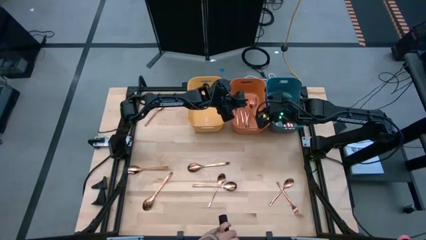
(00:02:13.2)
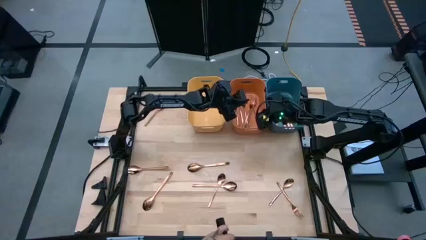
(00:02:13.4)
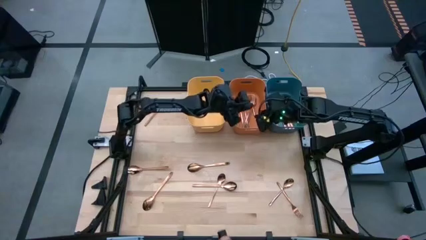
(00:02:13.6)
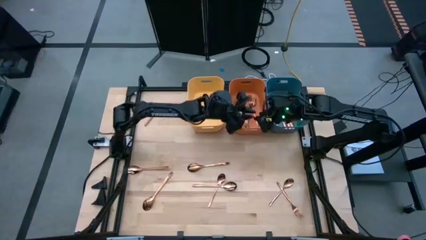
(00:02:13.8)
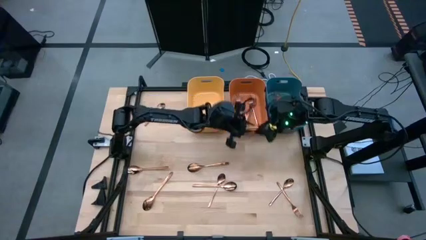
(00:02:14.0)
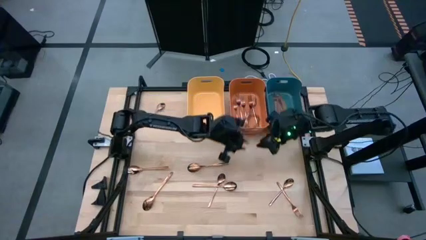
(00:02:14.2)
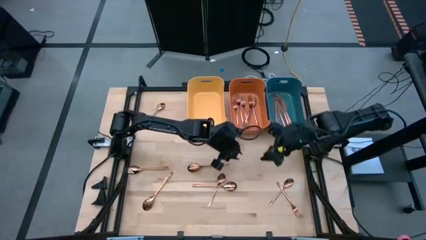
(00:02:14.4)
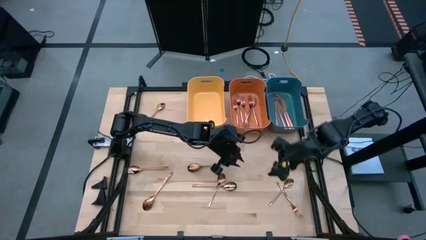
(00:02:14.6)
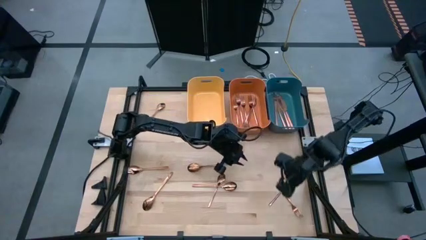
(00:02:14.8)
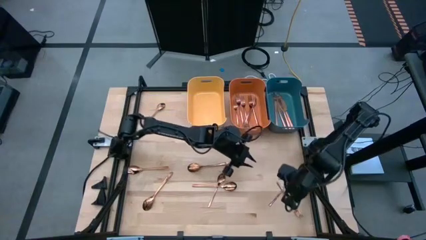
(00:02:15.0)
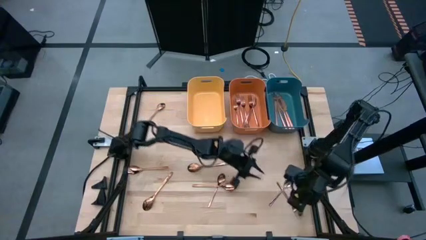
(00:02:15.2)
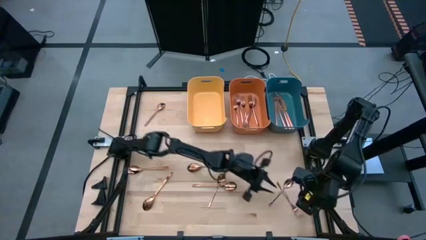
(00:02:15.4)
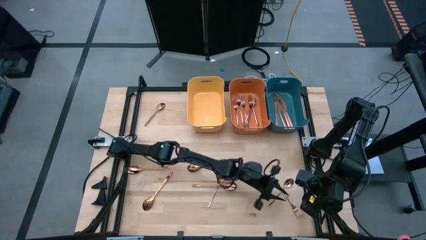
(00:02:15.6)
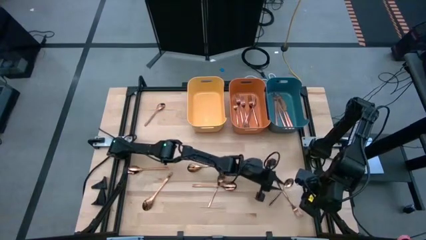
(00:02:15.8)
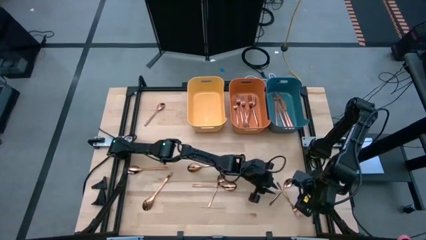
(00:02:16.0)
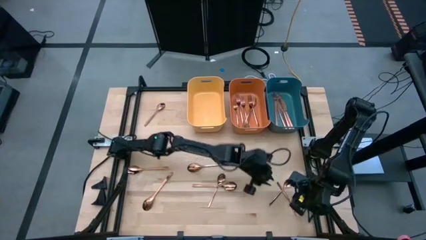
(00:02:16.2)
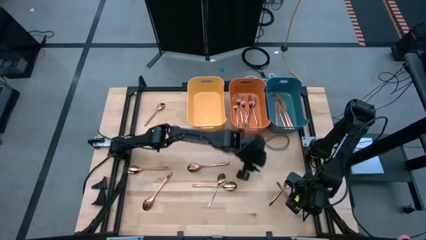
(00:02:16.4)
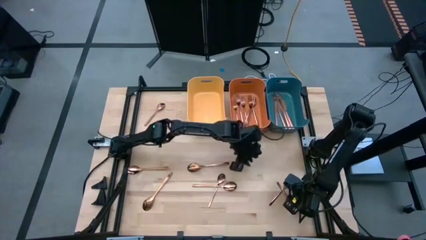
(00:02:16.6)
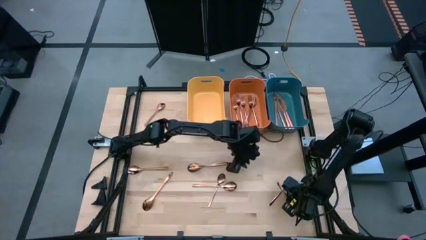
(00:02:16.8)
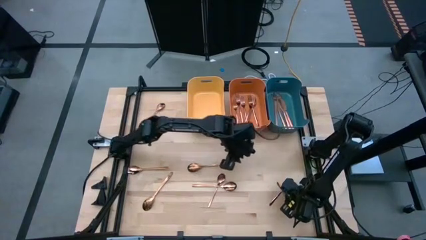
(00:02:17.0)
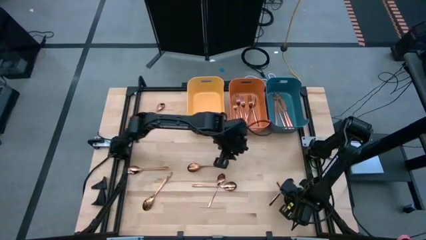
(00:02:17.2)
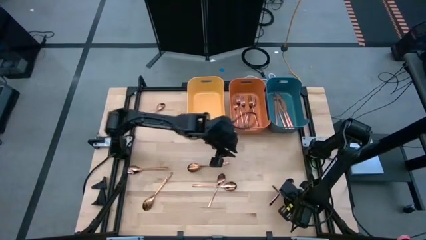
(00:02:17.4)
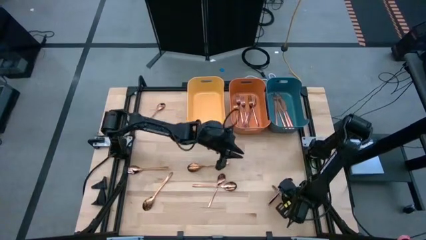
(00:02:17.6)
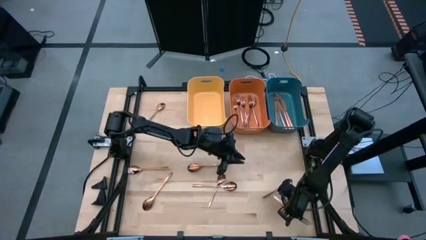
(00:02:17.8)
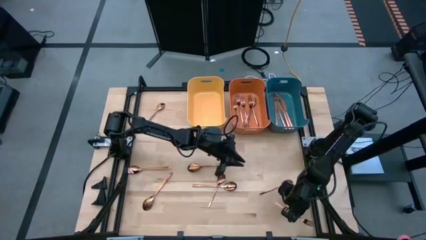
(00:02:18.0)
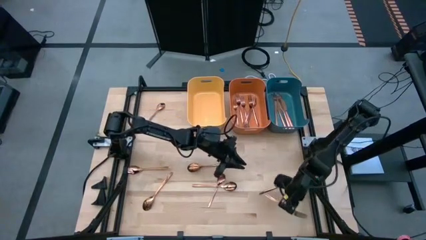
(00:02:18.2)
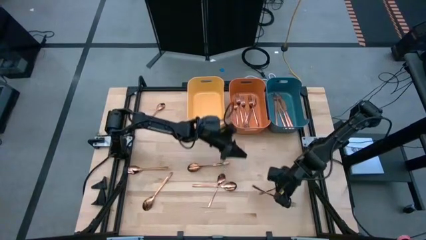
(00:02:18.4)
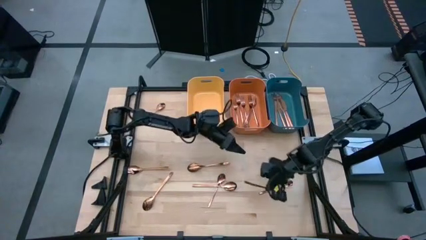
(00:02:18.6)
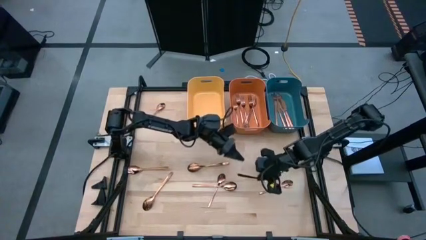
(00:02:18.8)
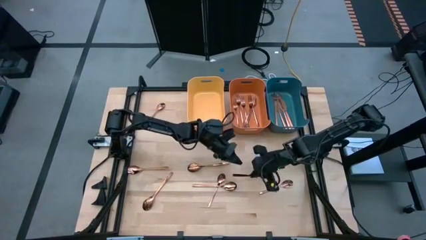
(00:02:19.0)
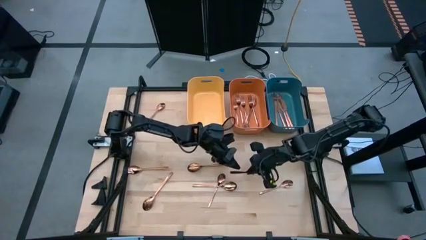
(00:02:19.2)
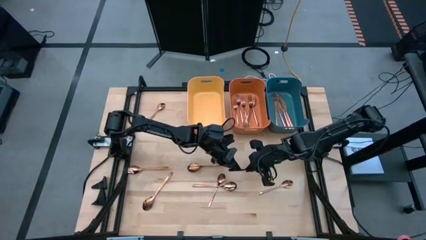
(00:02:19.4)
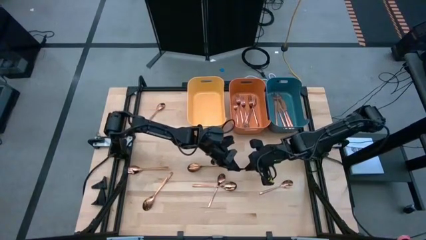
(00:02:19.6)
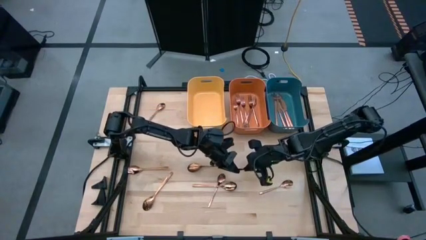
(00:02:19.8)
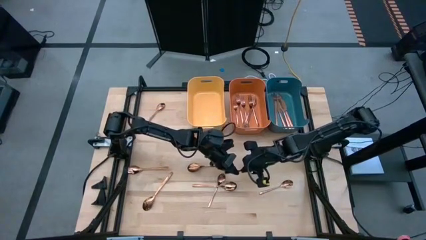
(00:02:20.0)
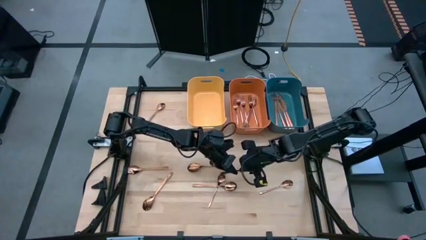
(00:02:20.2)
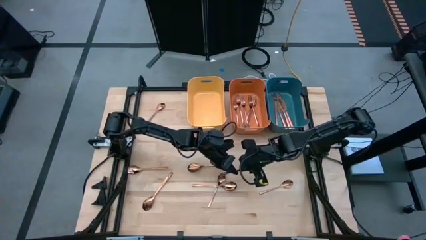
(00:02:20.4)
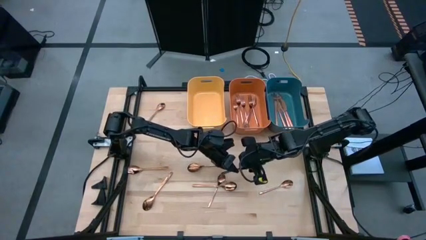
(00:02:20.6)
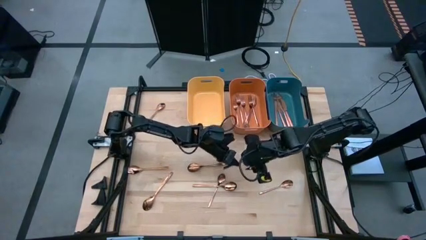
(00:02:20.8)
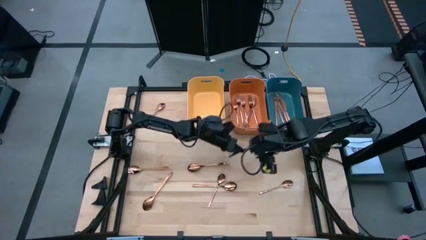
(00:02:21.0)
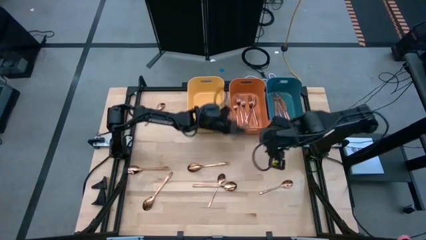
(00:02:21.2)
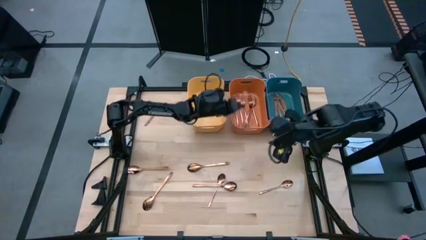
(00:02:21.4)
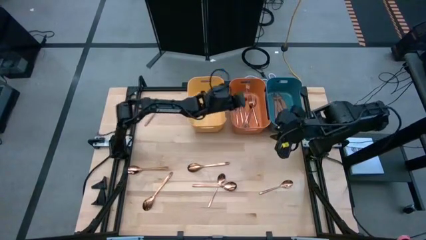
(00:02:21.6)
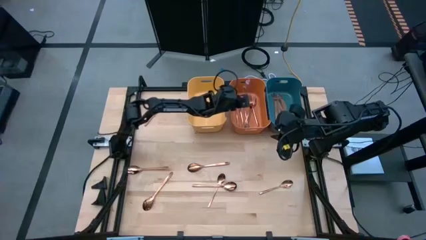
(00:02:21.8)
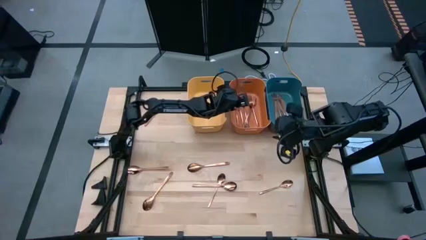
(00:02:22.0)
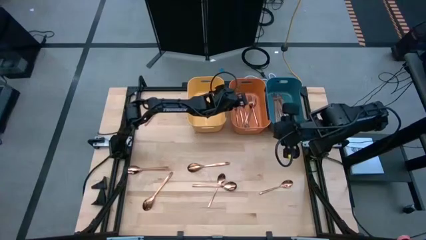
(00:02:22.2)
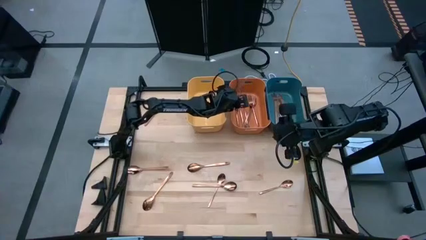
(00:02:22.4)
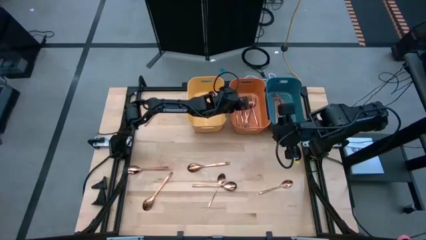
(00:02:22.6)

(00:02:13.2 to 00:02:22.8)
Task: Sort silverware
Put the copper fork into the orange bin

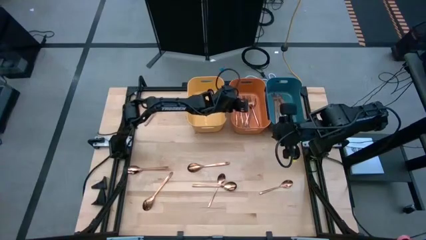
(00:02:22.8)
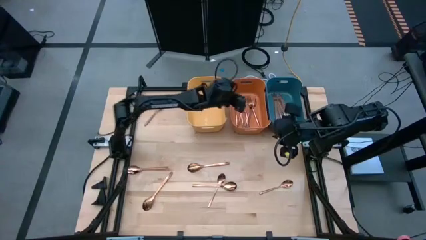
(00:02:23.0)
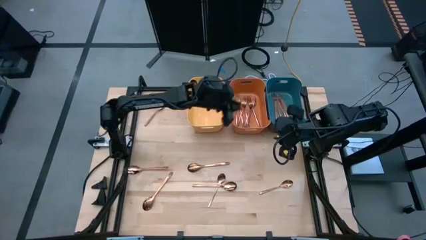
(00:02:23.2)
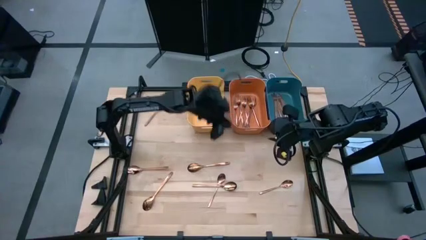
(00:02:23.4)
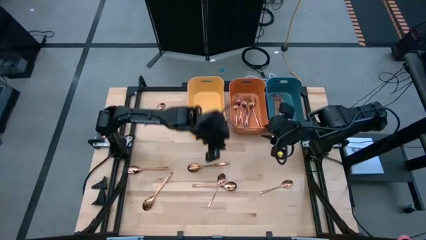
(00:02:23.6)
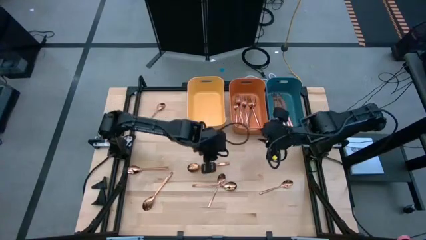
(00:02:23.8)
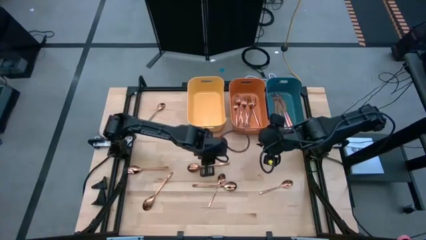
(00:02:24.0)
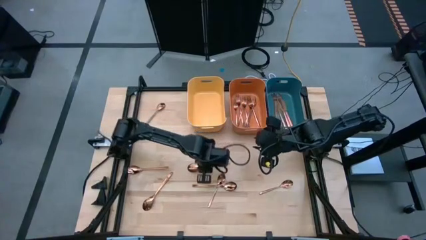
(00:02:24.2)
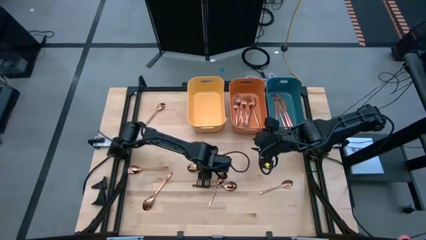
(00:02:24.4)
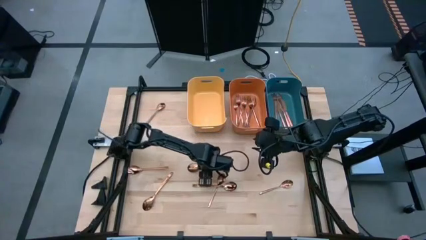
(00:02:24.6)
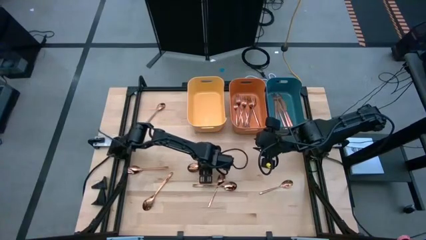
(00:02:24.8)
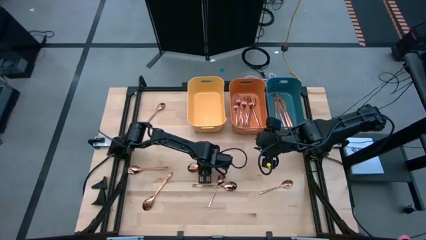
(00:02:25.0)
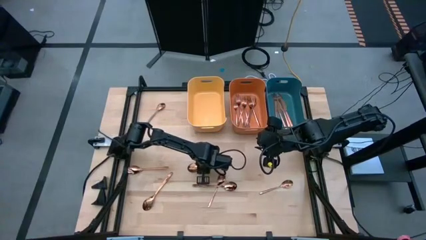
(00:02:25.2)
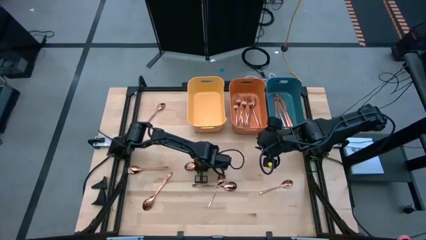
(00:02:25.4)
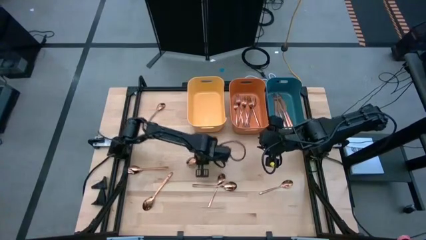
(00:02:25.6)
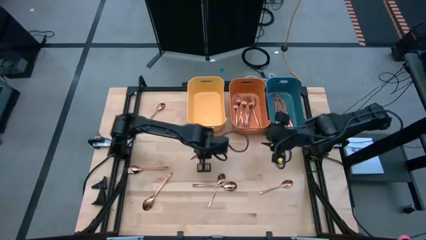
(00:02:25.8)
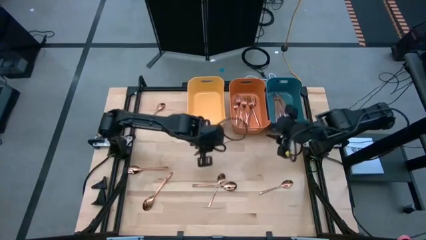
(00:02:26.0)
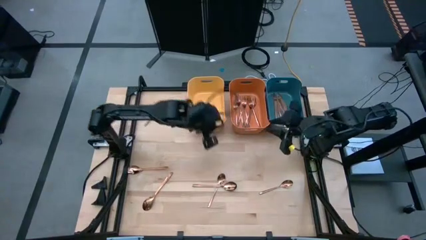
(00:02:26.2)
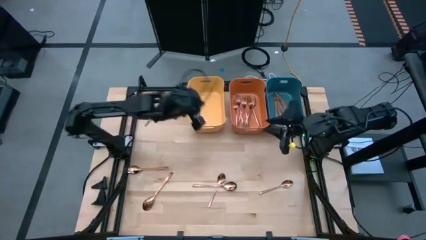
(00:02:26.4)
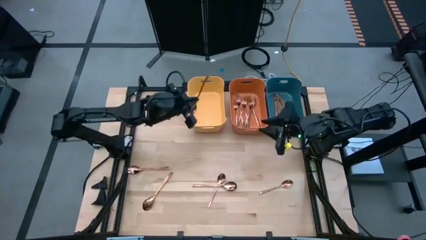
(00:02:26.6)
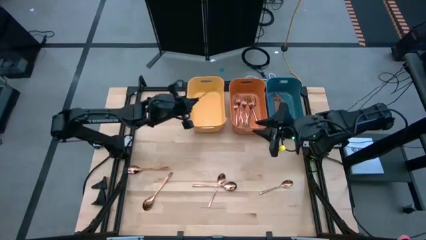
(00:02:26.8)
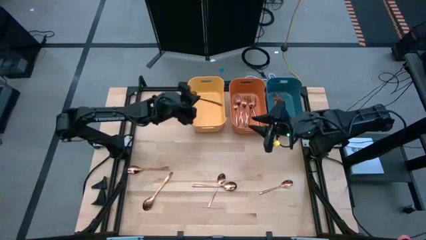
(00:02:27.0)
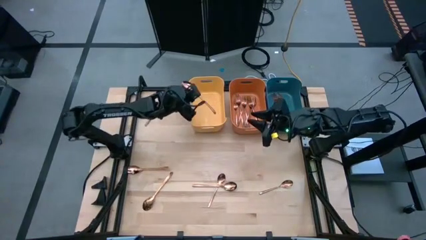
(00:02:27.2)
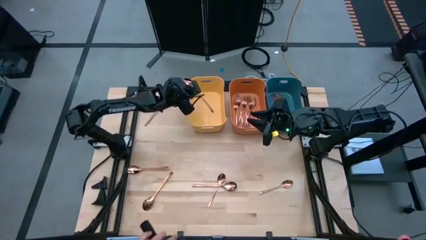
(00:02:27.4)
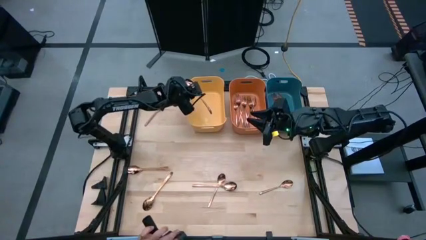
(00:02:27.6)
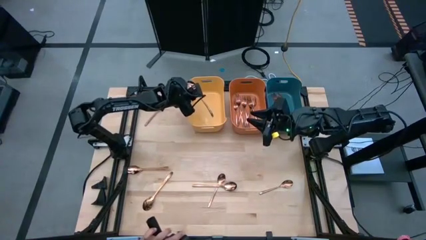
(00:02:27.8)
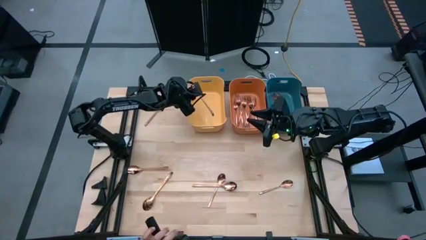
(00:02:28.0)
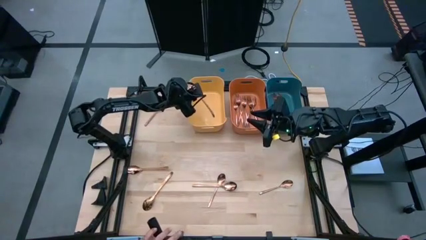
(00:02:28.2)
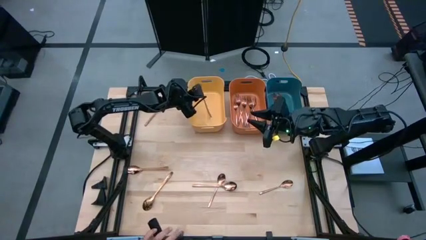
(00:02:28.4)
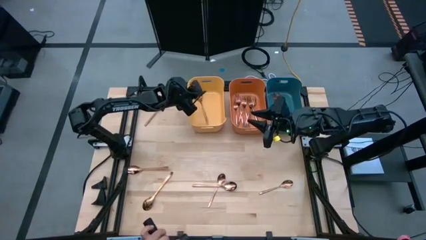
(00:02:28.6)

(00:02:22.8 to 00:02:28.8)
Put the copper spoon into the yellow bin
